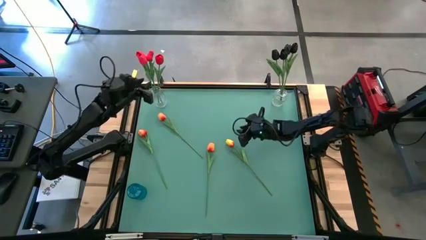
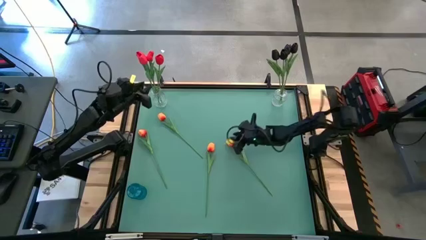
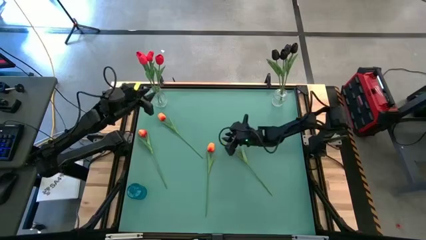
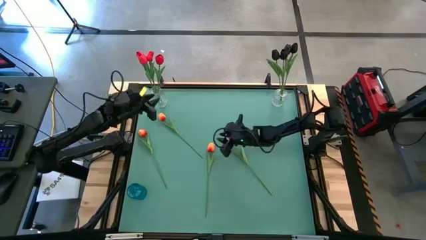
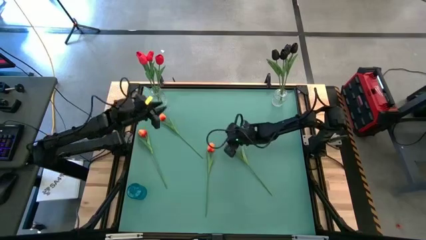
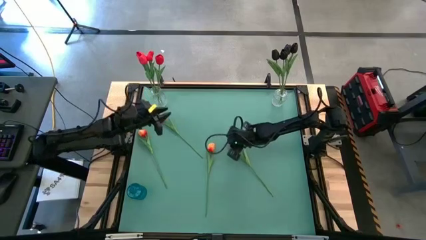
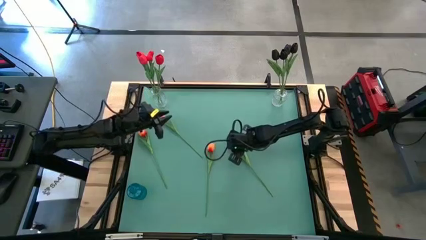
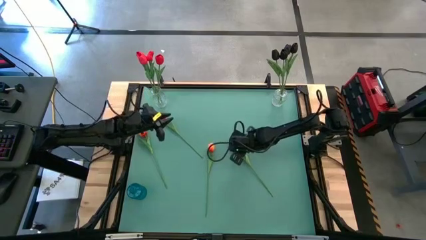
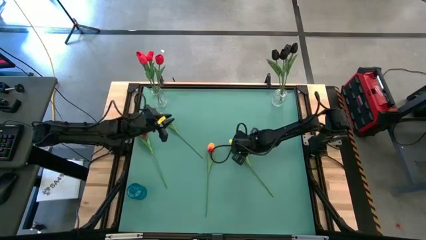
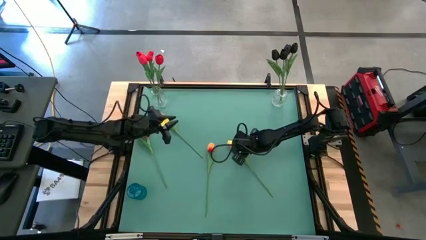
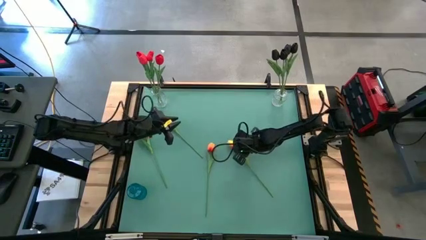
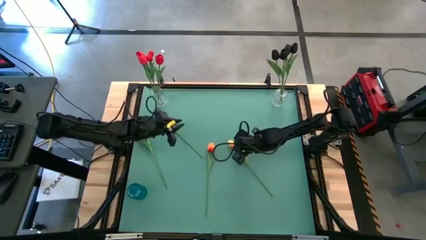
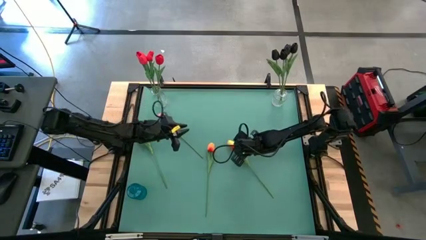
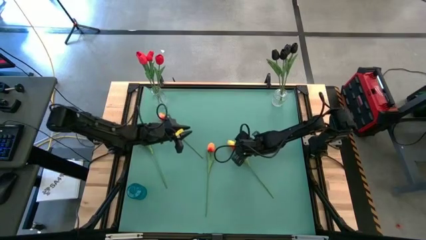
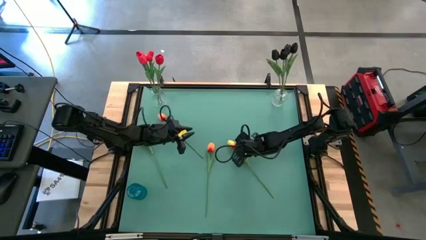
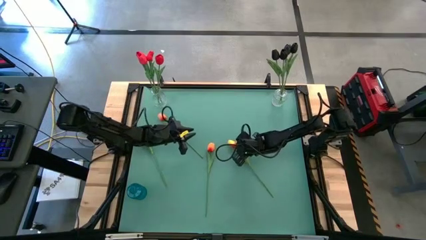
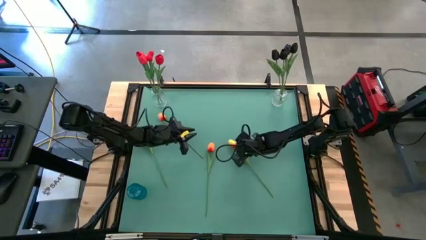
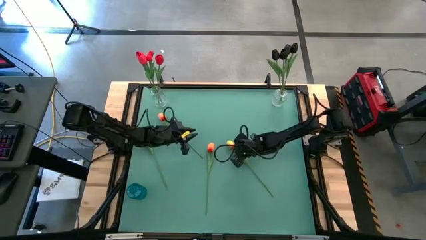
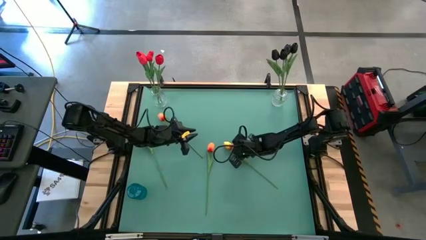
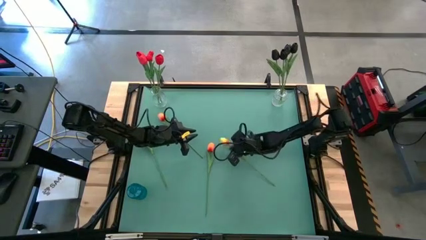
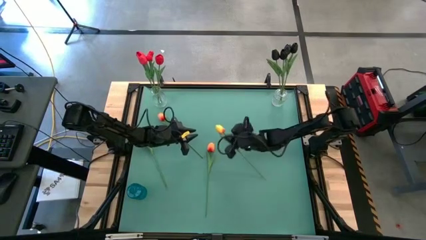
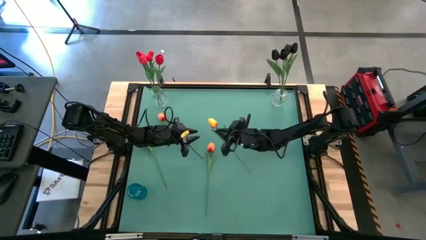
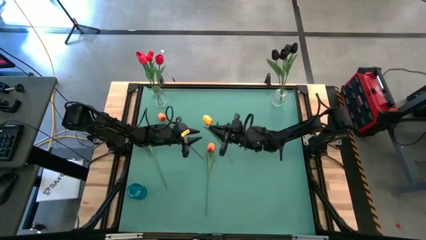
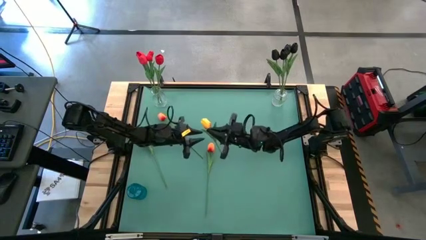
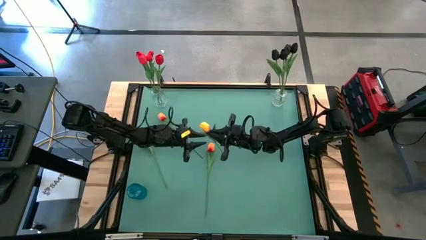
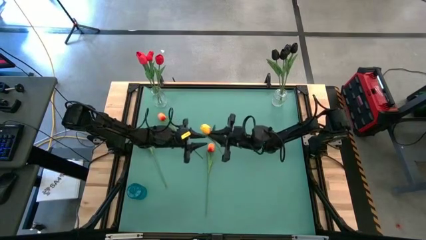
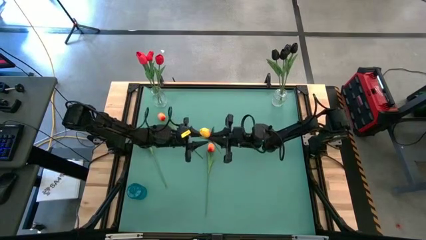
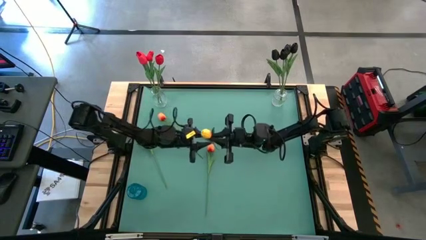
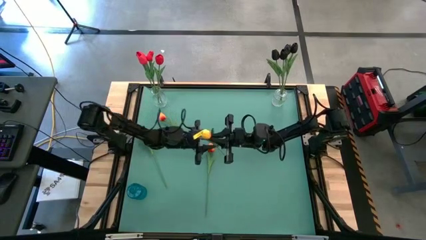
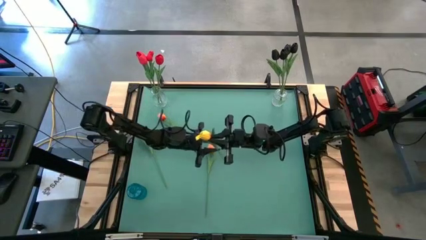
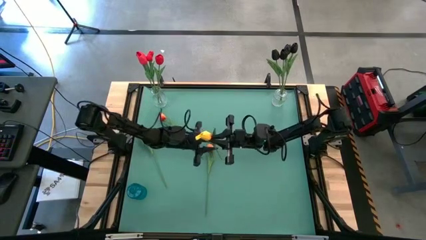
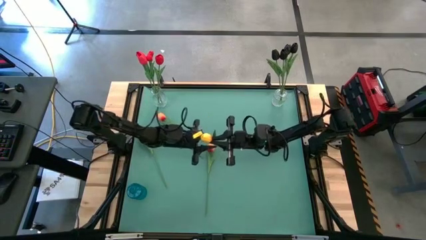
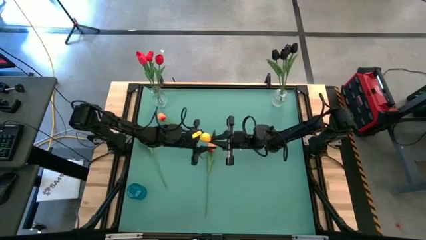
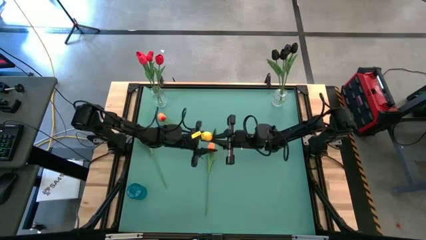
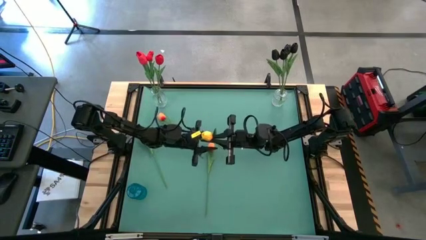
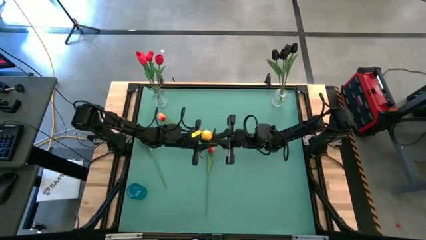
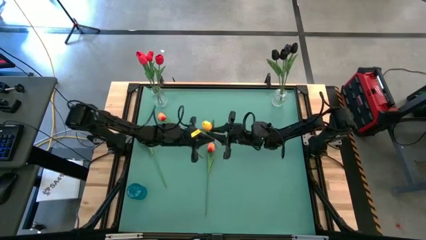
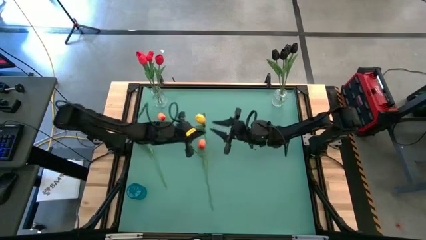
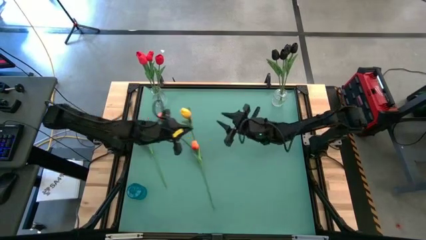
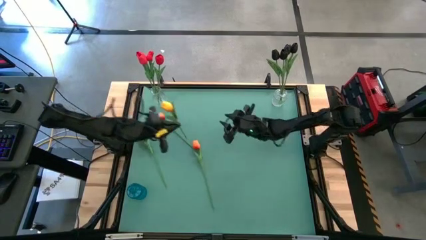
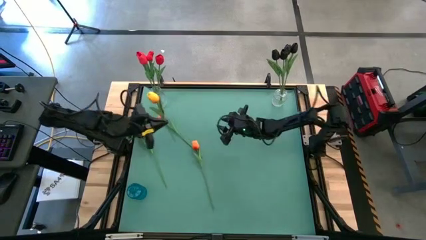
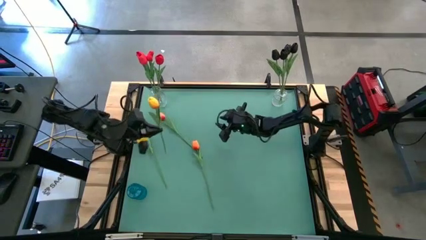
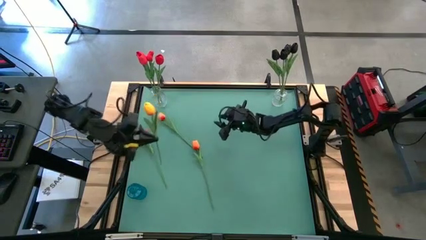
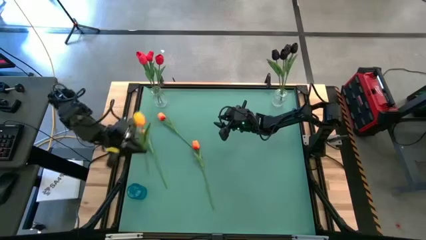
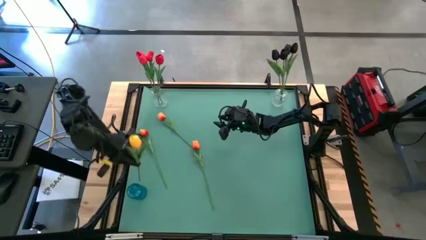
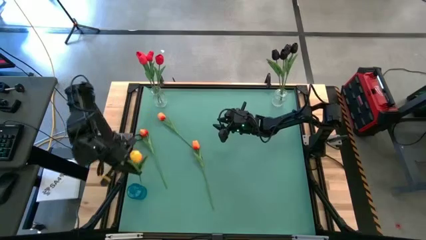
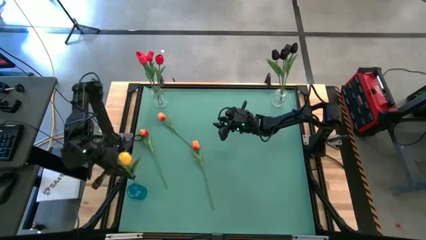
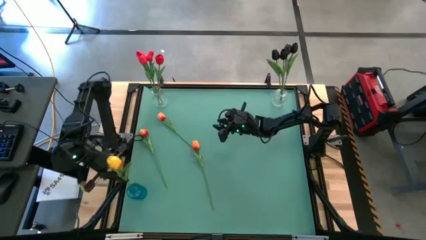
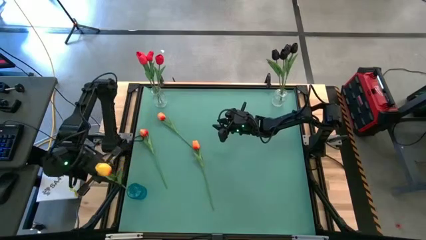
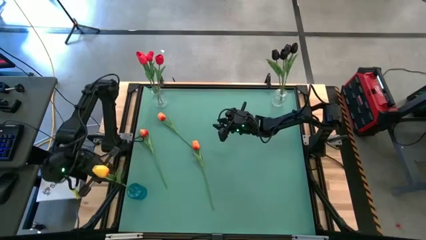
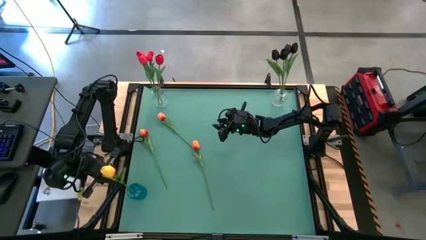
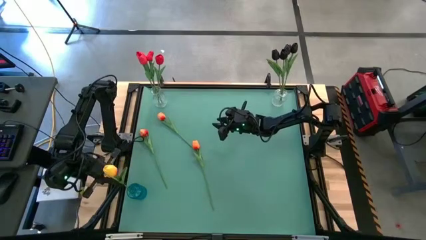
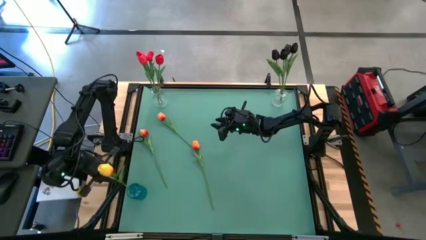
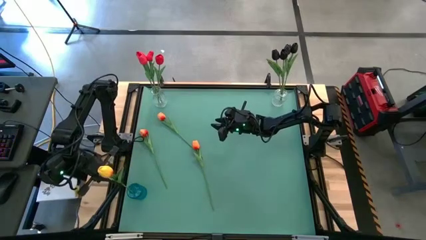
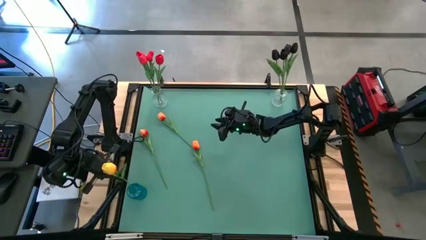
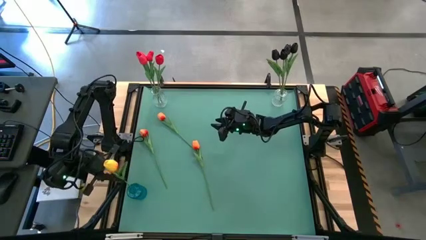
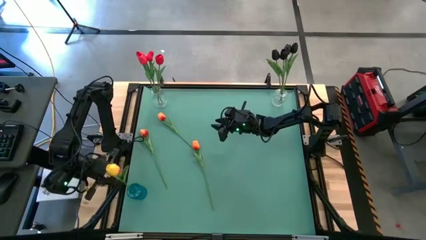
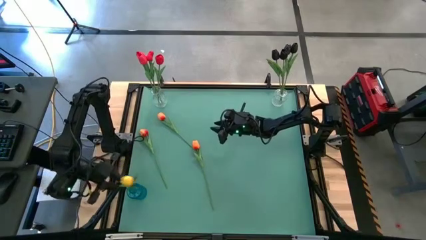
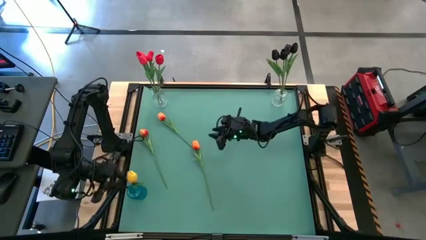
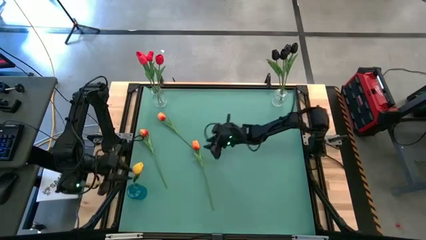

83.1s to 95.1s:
Task: Sort flowers into vase by color
Put the orange tulip into the blue vase

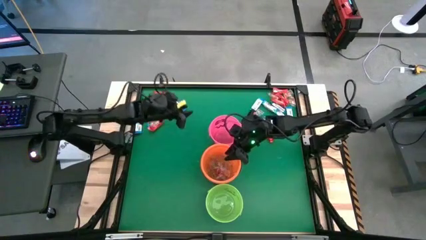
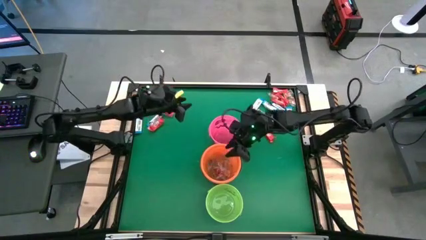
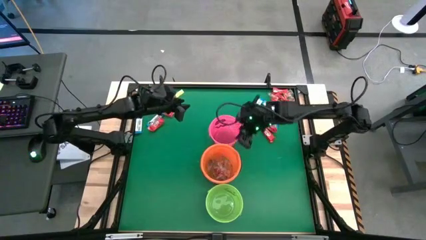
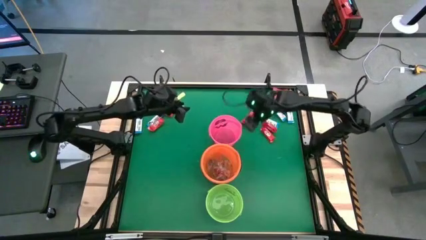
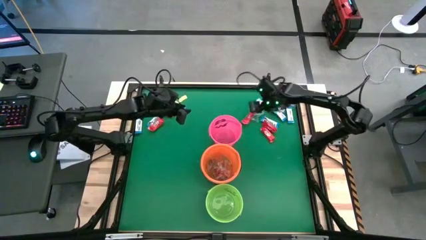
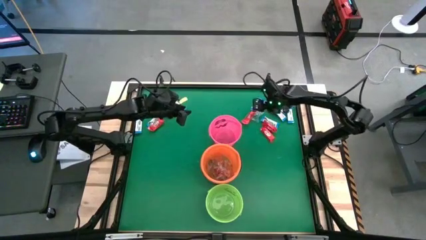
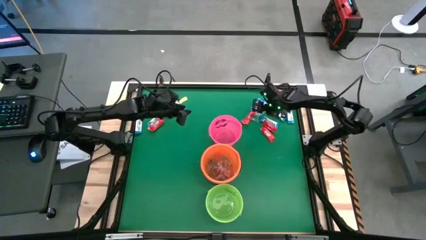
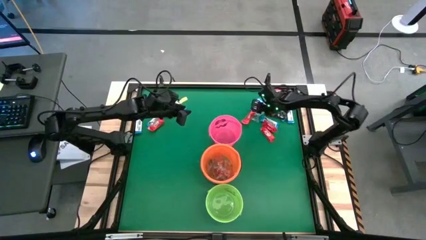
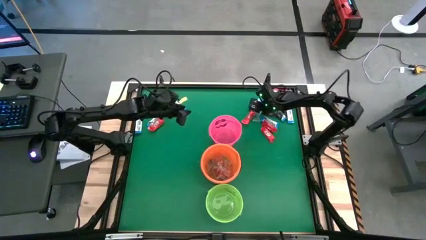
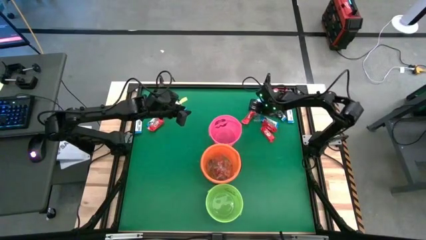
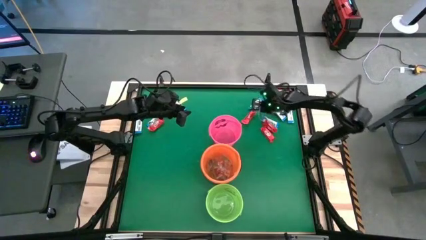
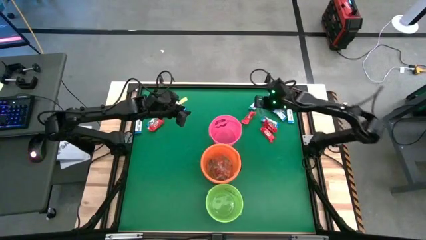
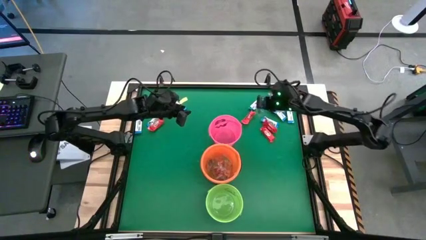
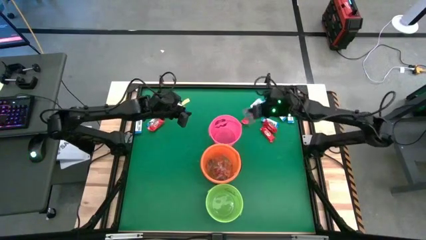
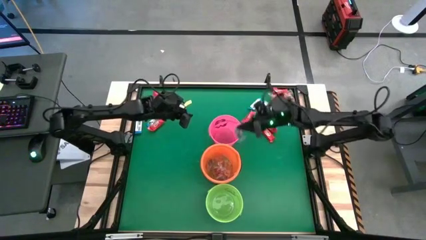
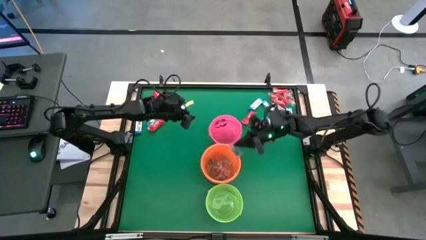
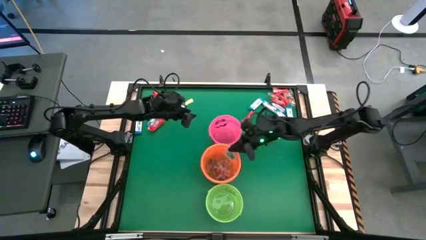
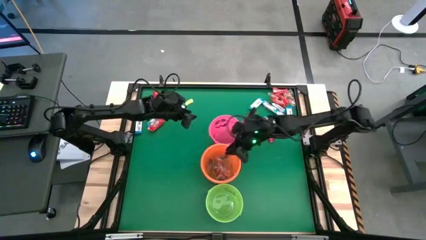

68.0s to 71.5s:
Task: Sort candy by brand, put in halloween buckets
Put the blue gummy into the orange bucket
